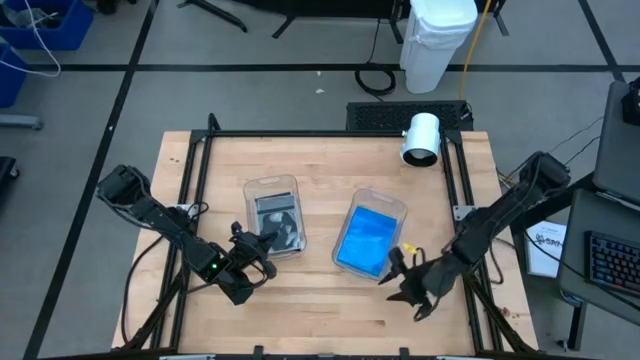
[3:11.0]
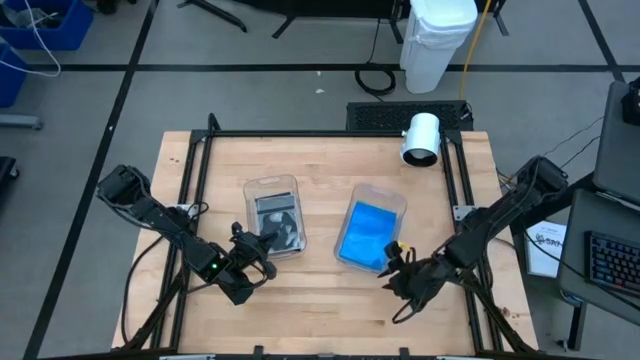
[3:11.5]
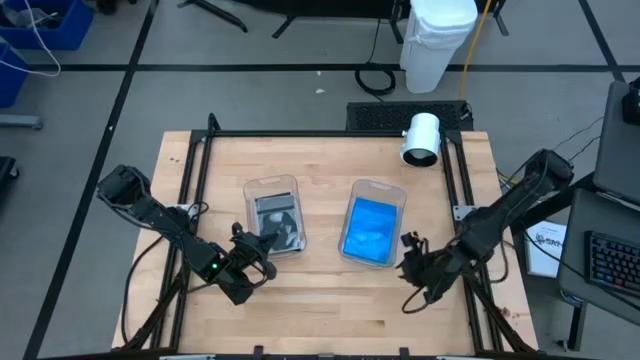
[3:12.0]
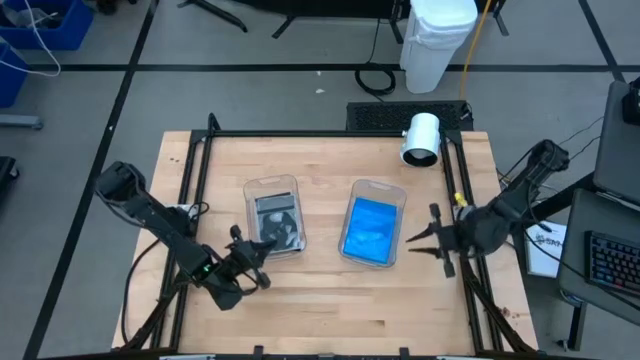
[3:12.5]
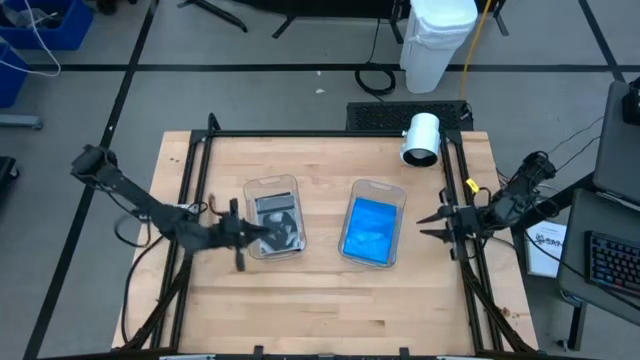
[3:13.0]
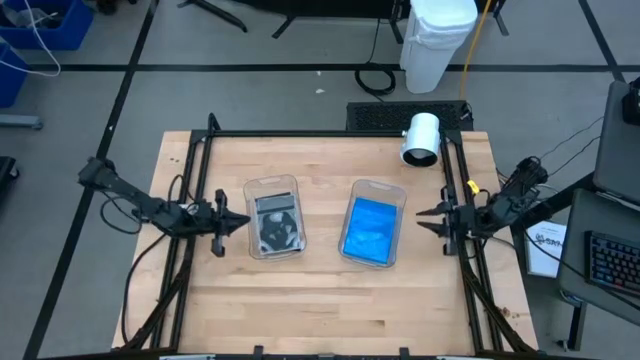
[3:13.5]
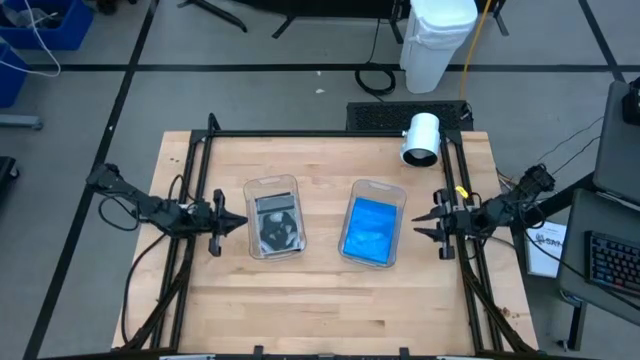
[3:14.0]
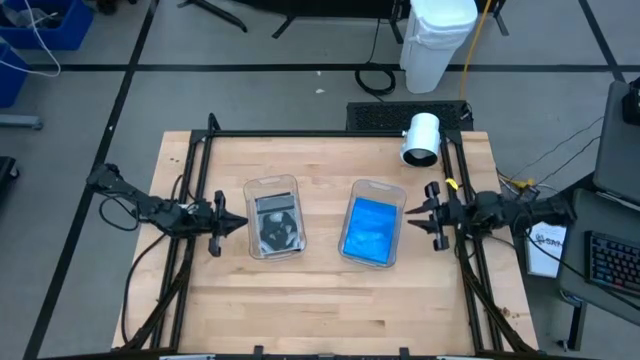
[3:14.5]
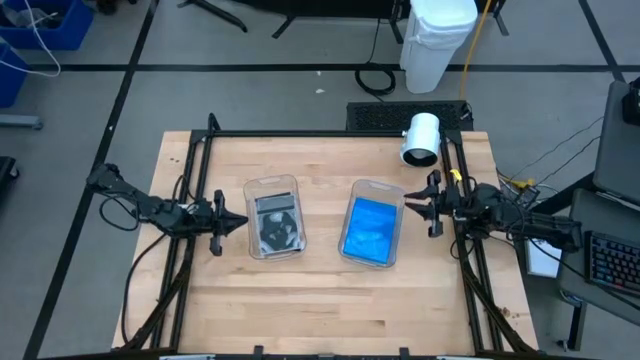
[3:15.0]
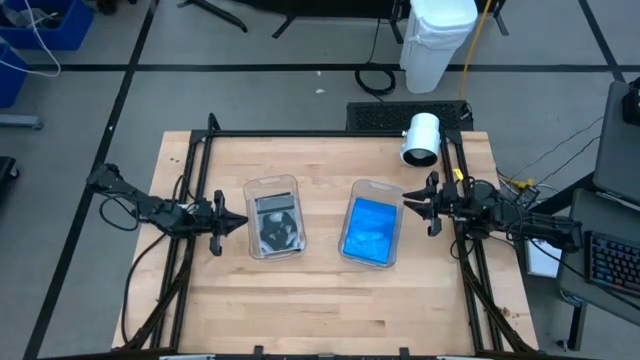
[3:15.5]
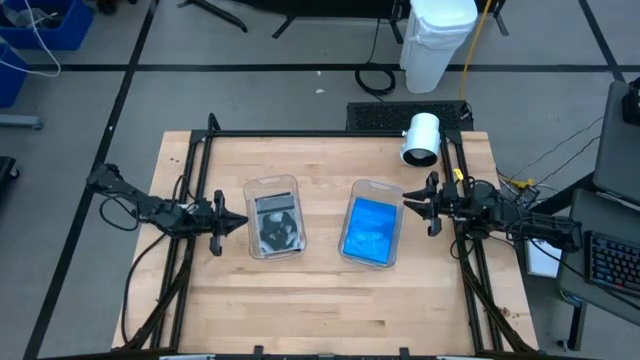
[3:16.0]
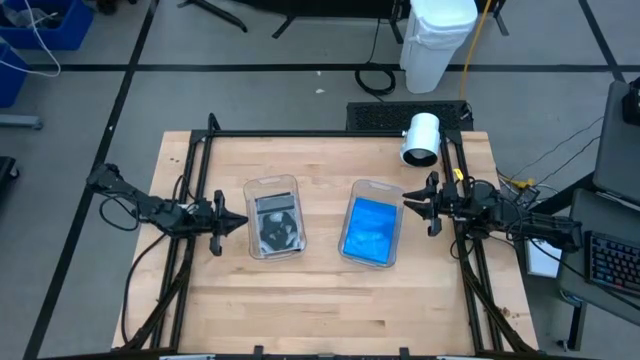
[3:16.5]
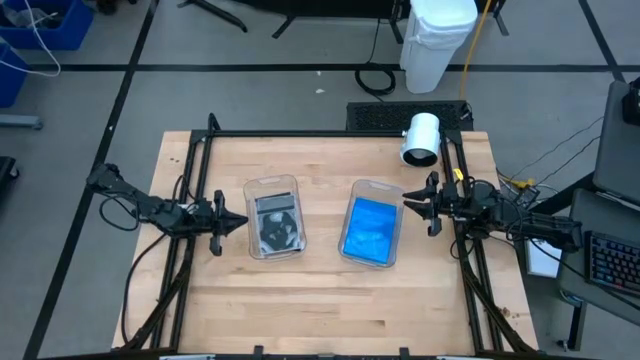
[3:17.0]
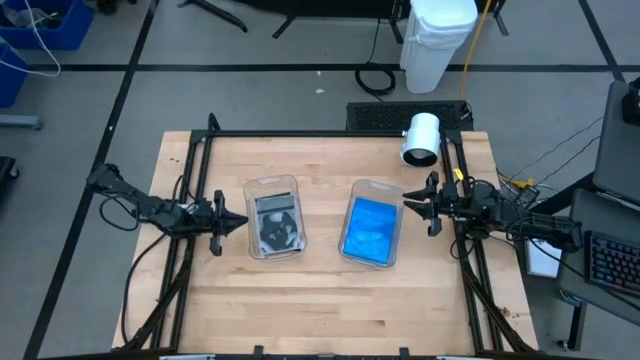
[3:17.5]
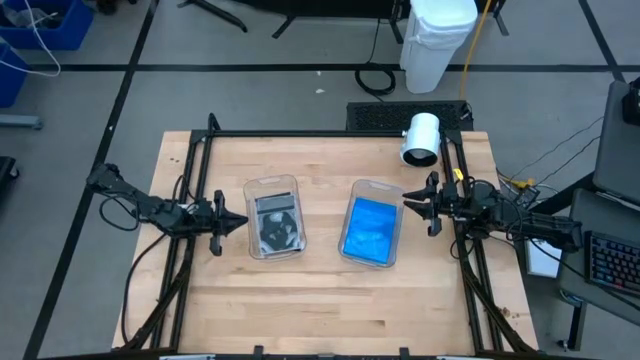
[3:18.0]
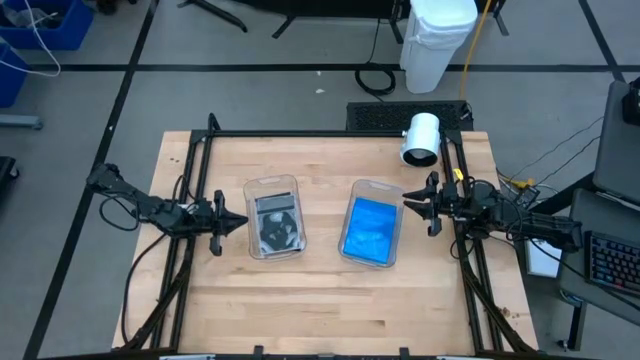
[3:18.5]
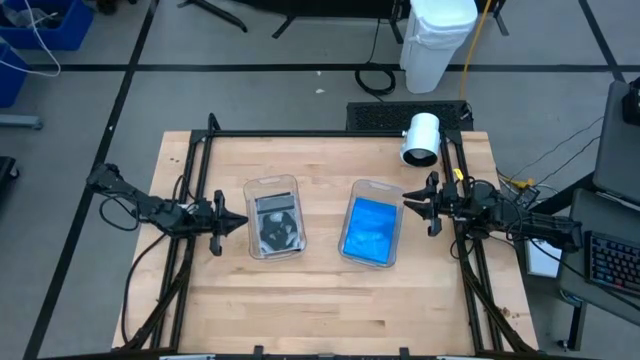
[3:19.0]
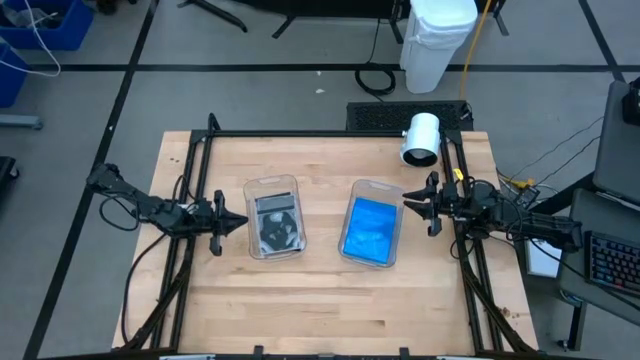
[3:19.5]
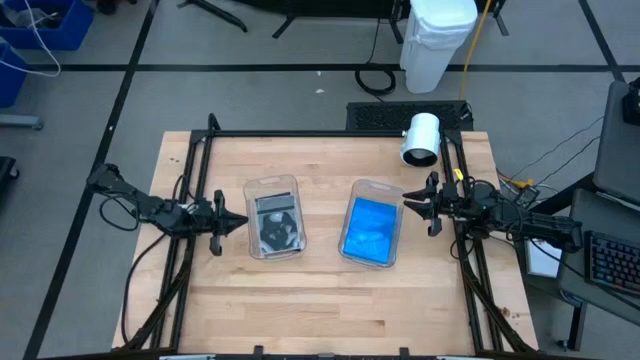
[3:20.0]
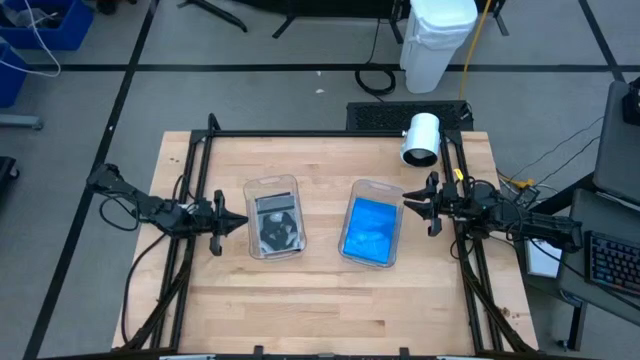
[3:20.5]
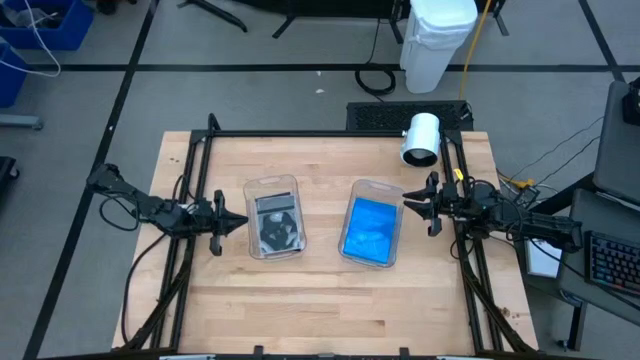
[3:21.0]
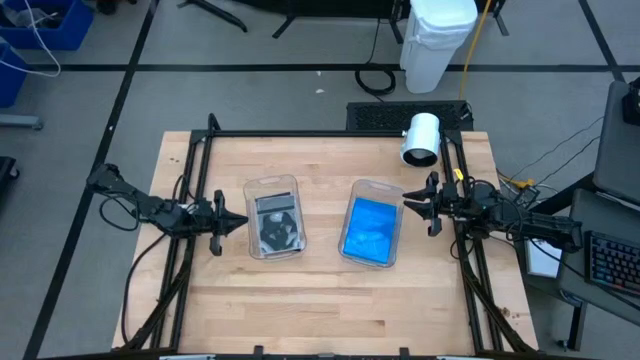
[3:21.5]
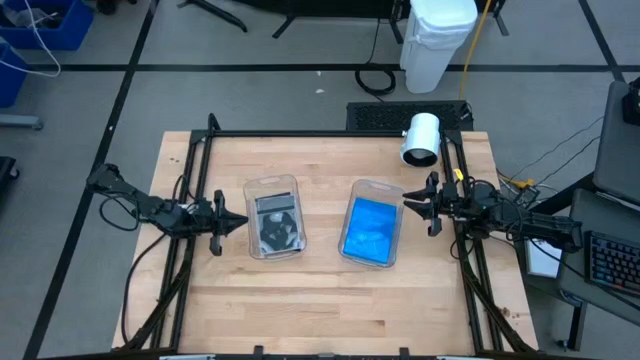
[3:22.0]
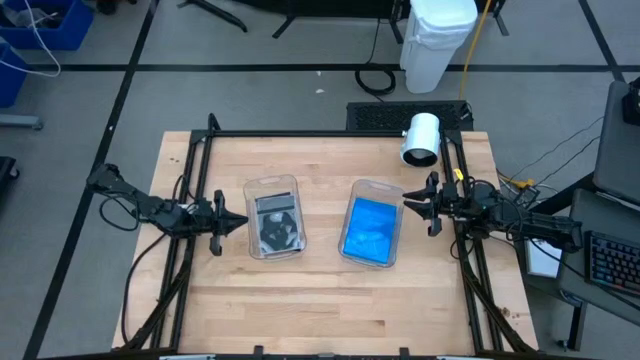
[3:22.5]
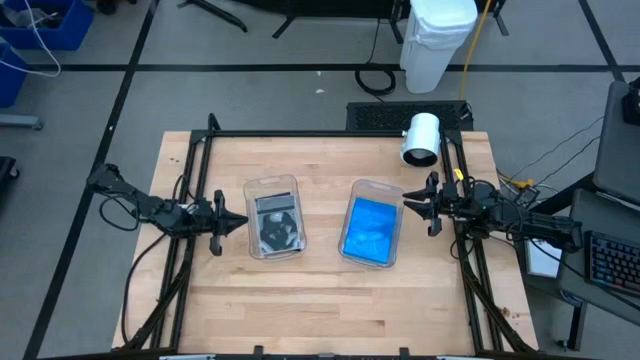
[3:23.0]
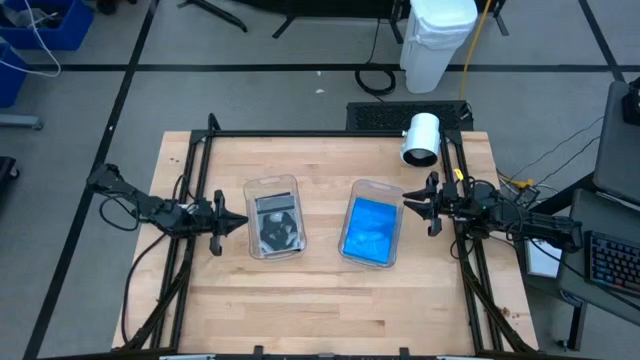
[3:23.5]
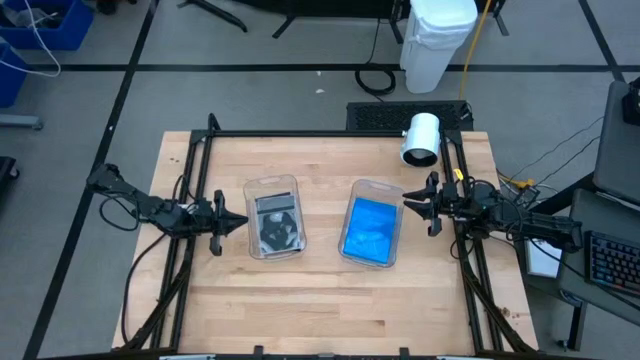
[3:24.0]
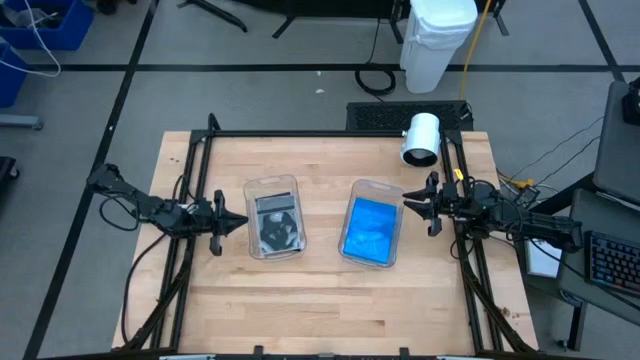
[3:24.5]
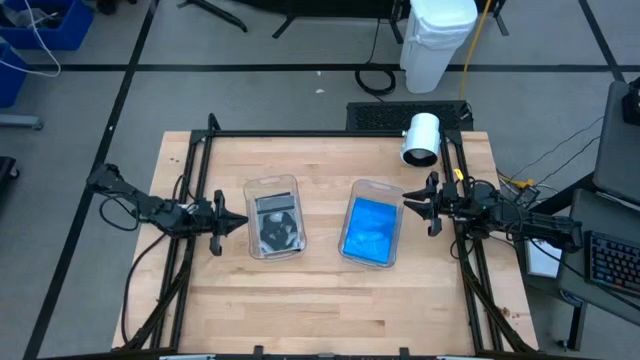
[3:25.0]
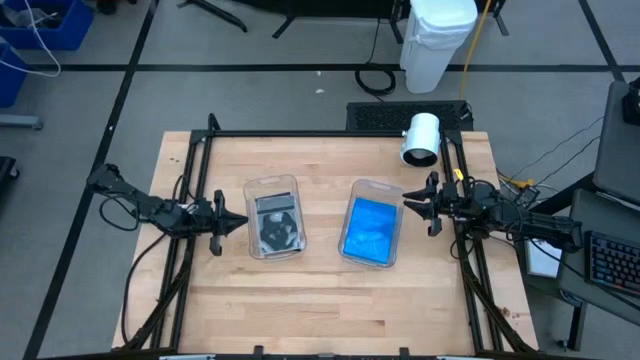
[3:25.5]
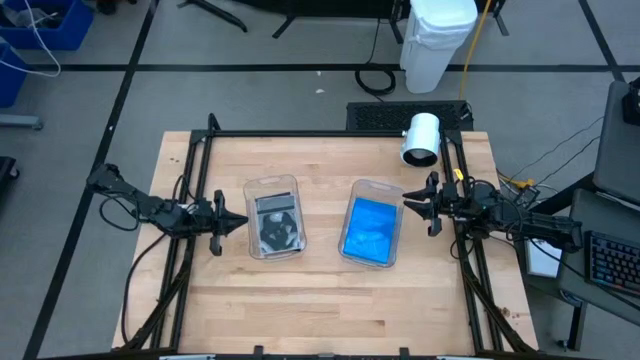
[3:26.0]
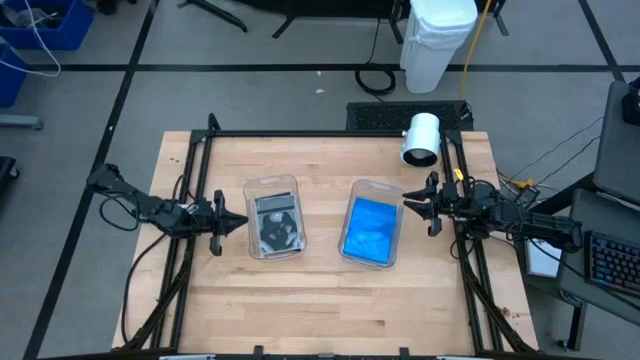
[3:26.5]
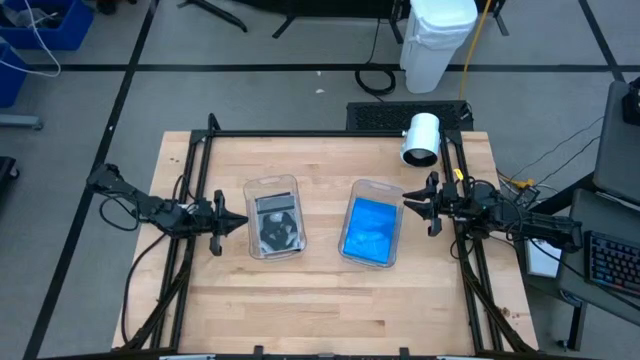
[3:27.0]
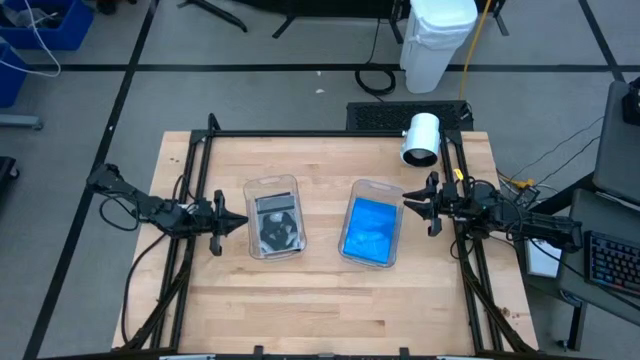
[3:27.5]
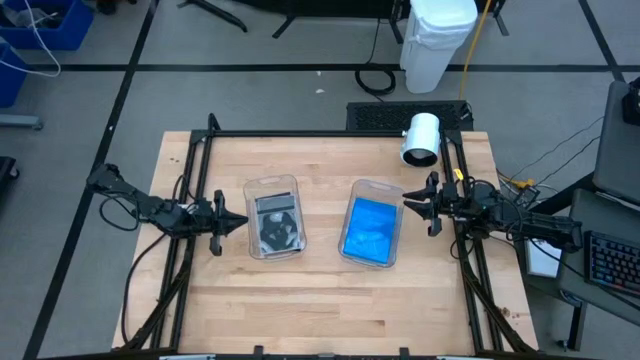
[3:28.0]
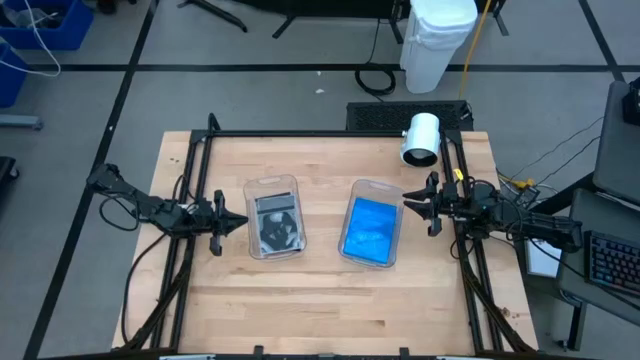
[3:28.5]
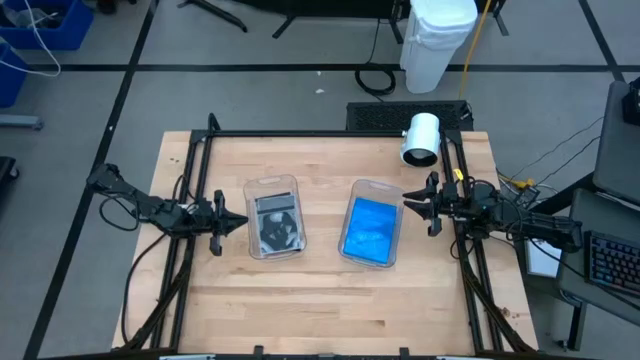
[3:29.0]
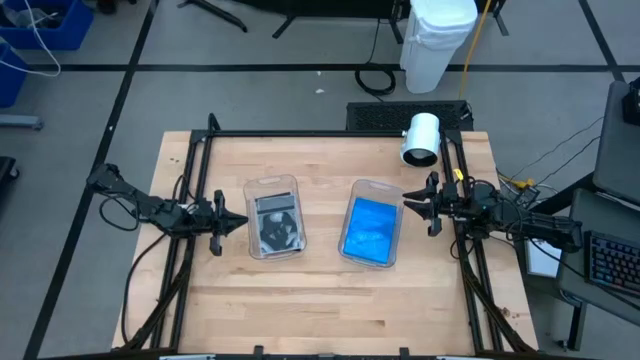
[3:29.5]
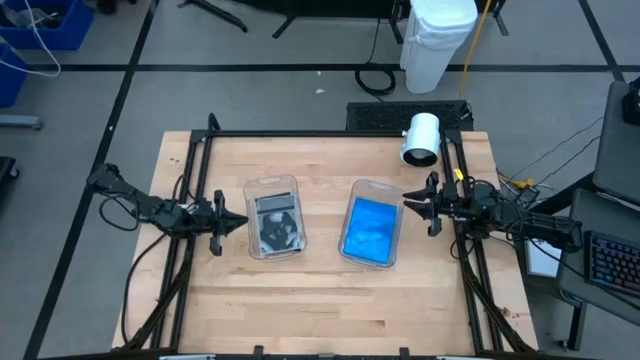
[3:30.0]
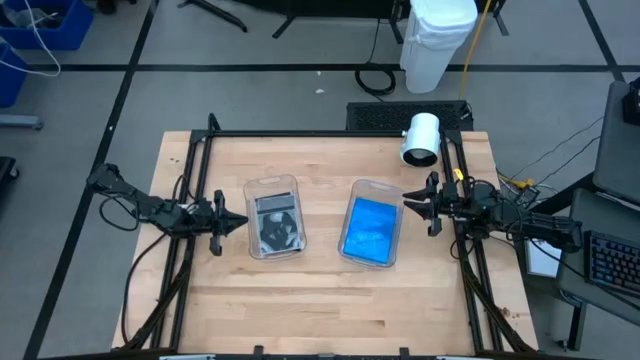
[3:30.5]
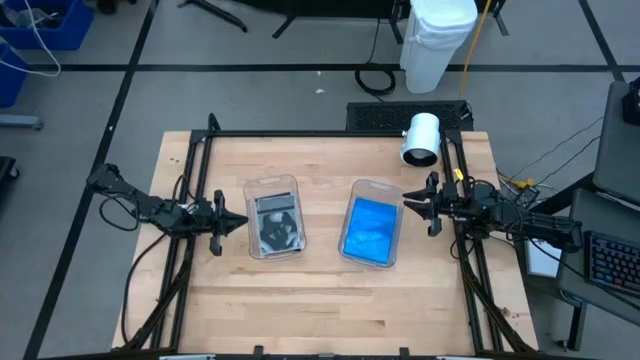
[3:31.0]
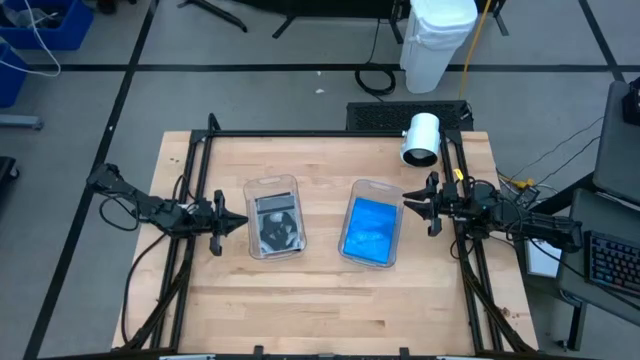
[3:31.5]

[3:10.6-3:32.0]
Task: Pick & place jewel cases by type
Return to Home Position
